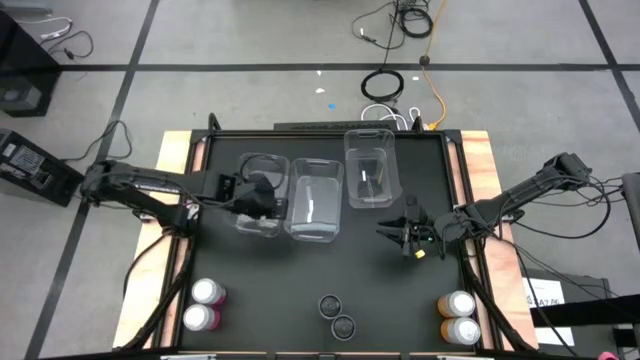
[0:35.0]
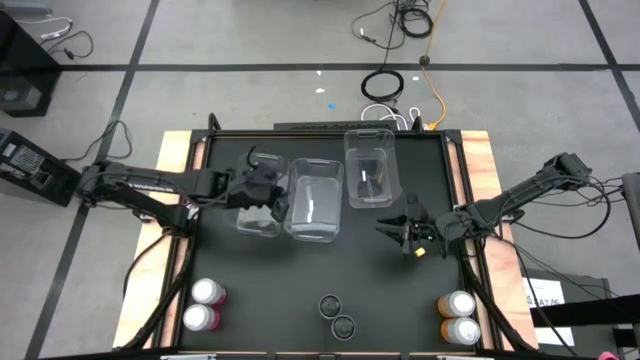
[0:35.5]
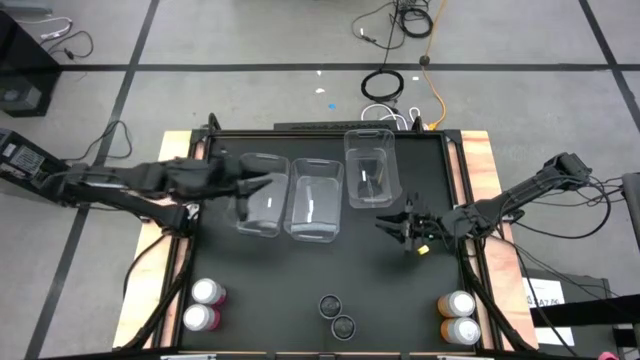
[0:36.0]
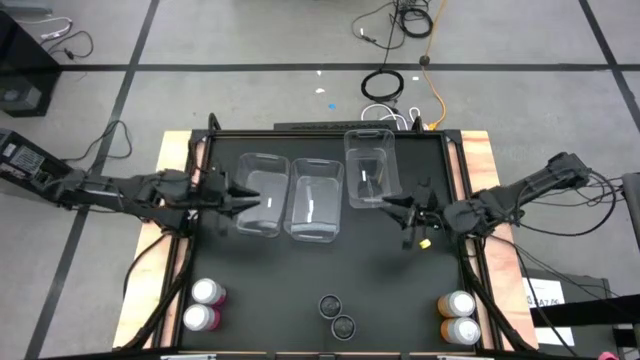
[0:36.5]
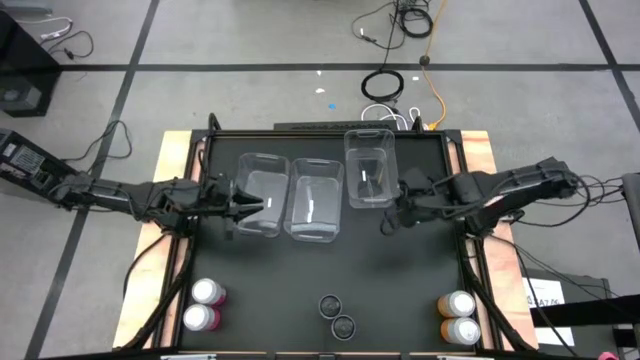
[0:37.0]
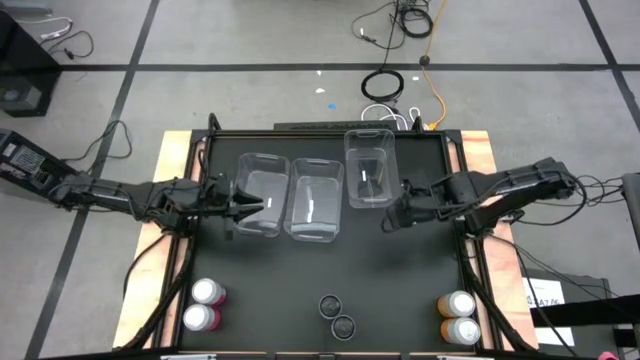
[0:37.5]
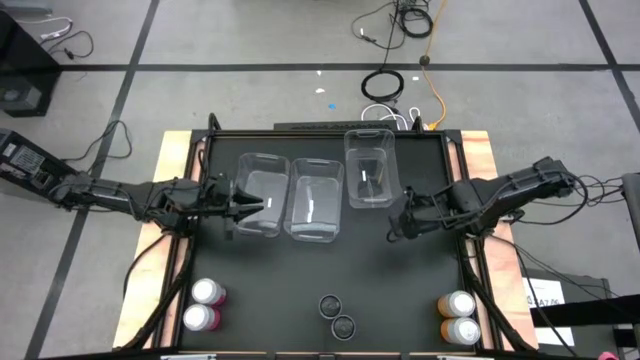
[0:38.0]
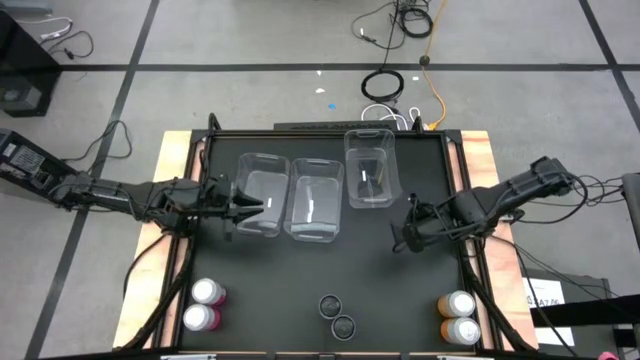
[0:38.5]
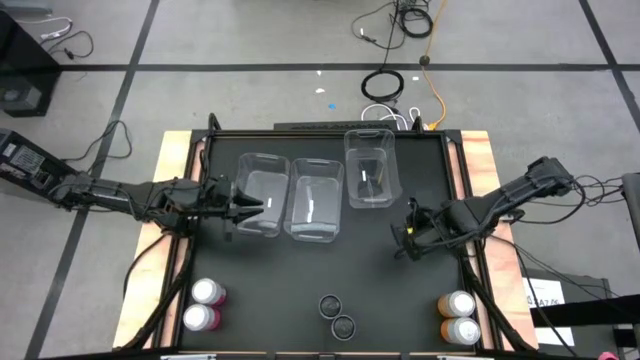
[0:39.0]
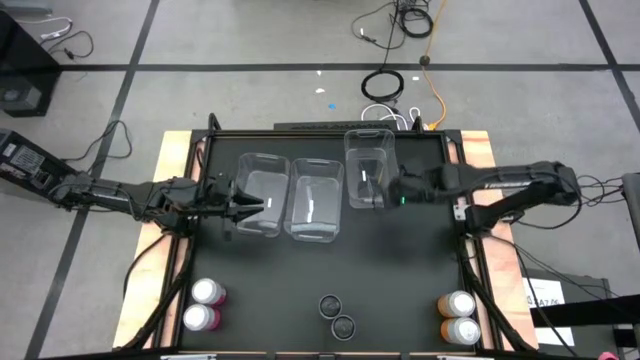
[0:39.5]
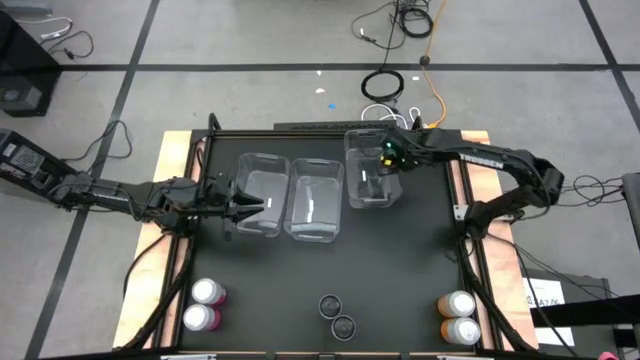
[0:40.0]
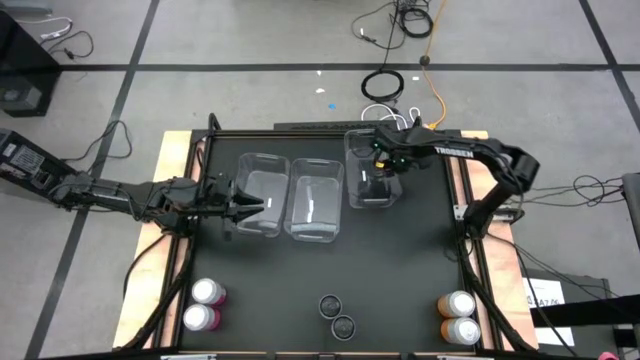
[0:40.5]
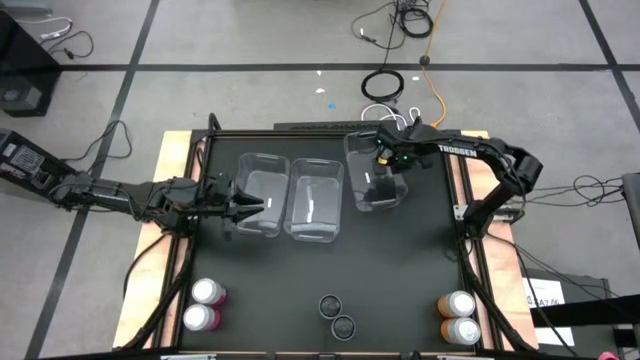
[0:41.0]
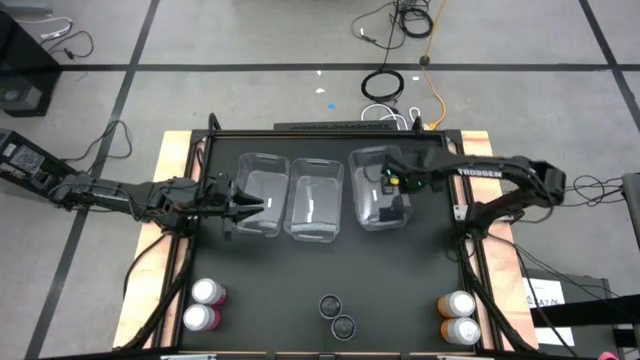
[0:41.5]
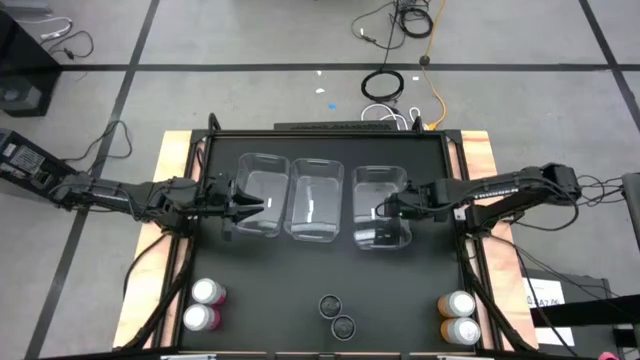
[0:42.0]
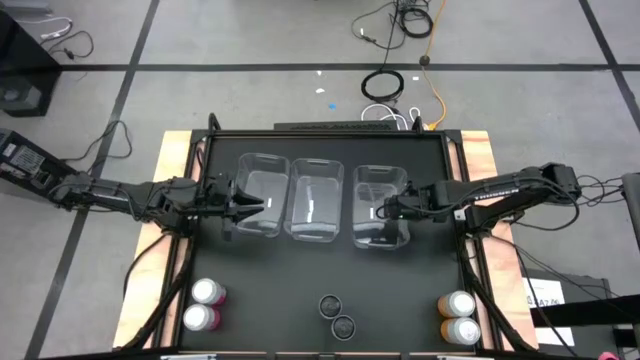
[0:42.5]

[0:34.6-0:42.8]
Task: Sort soda cans
Adjust the right transparent bin to align with the other transparent bins

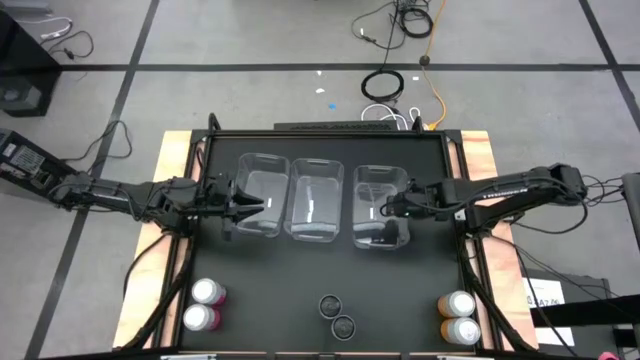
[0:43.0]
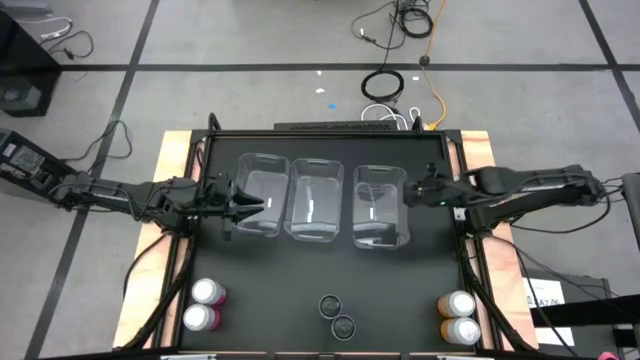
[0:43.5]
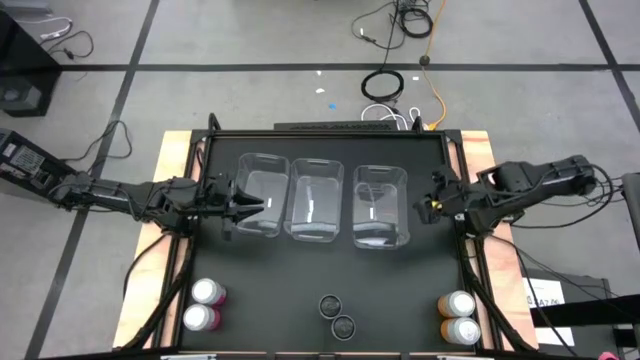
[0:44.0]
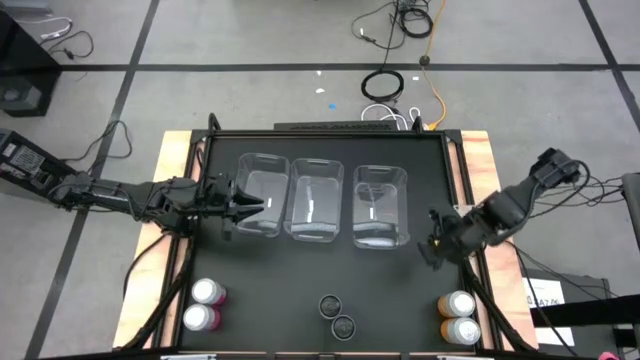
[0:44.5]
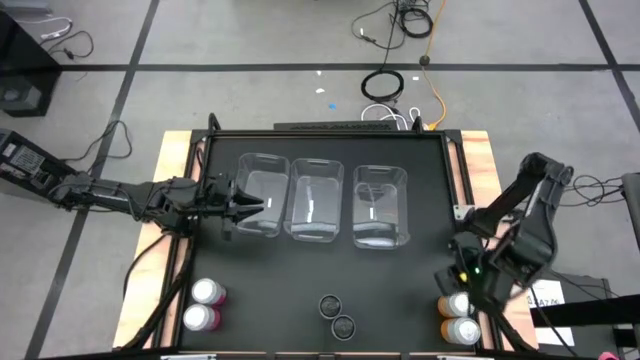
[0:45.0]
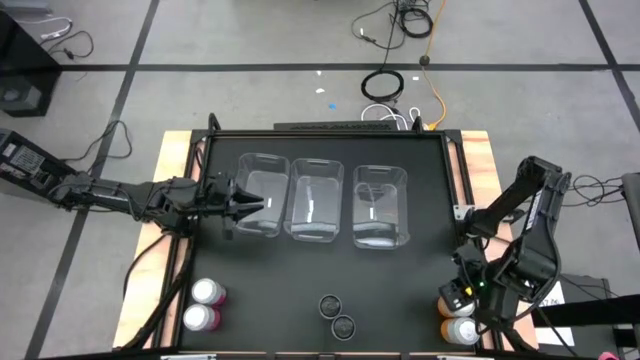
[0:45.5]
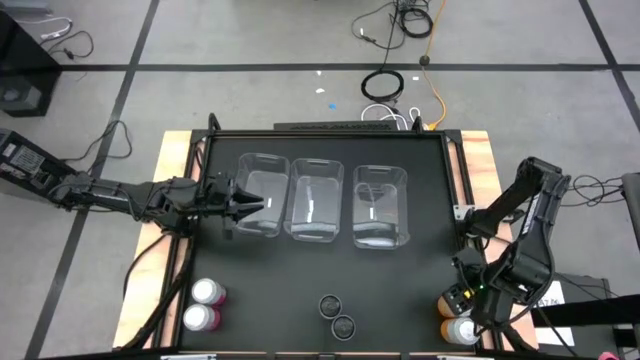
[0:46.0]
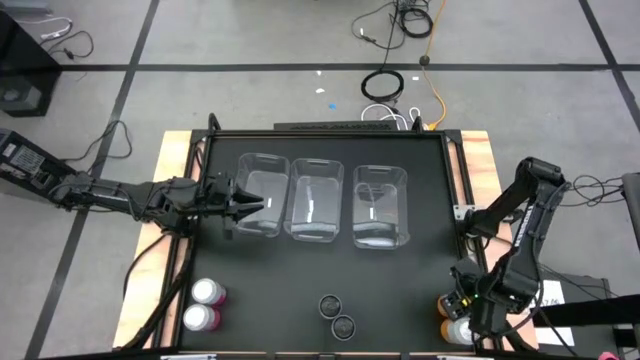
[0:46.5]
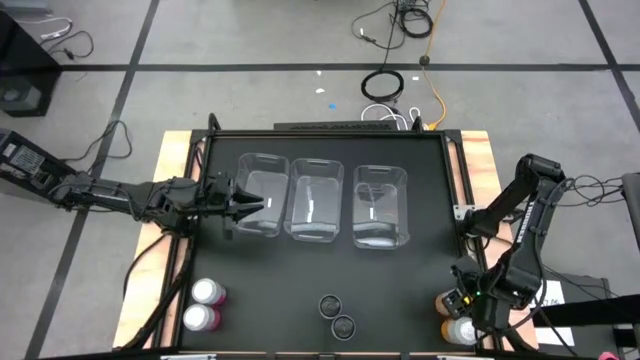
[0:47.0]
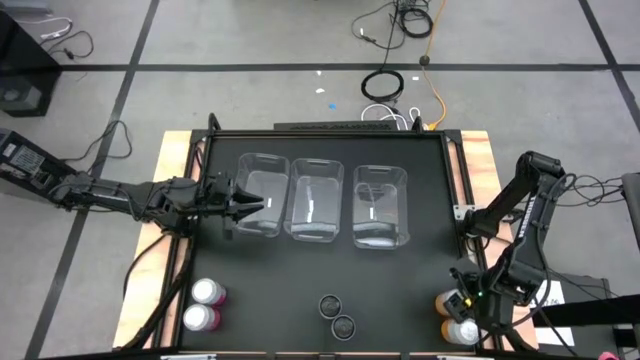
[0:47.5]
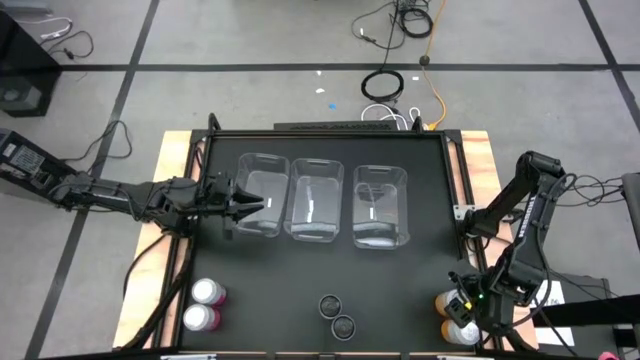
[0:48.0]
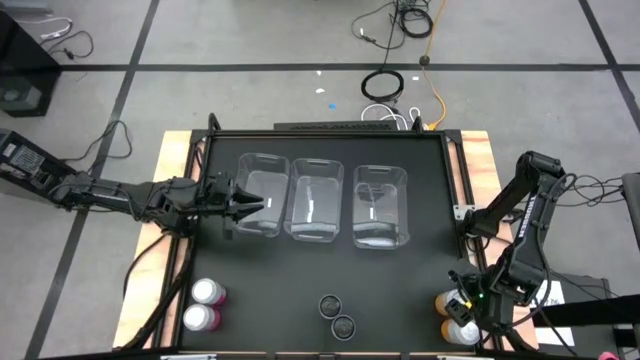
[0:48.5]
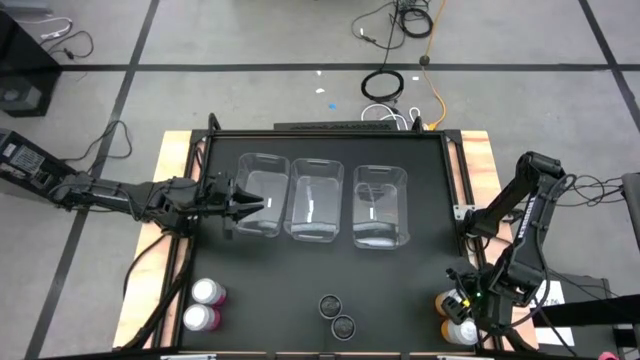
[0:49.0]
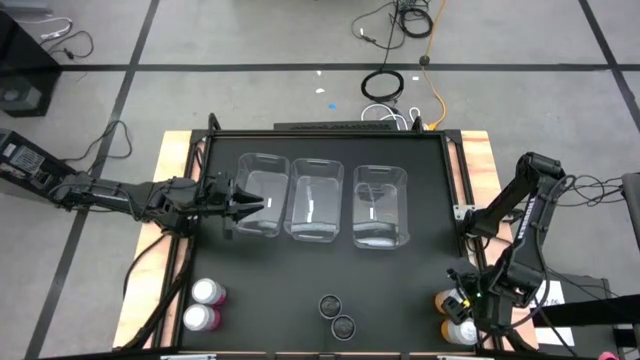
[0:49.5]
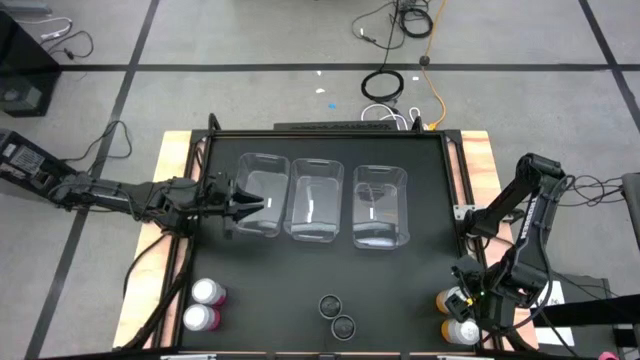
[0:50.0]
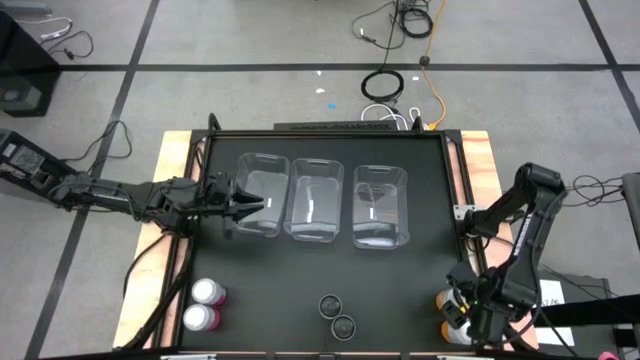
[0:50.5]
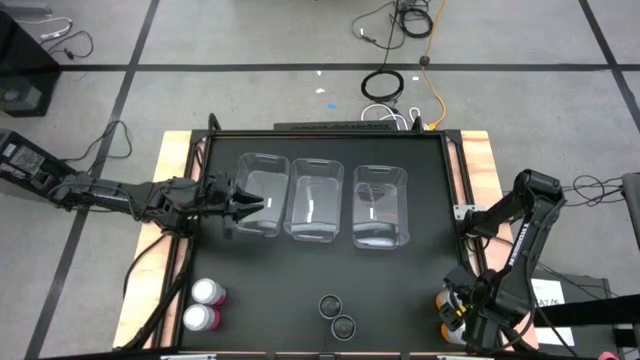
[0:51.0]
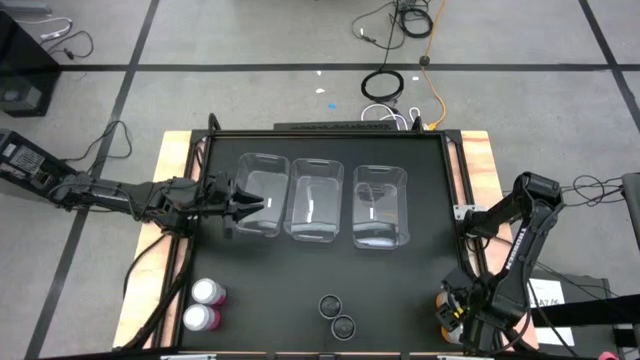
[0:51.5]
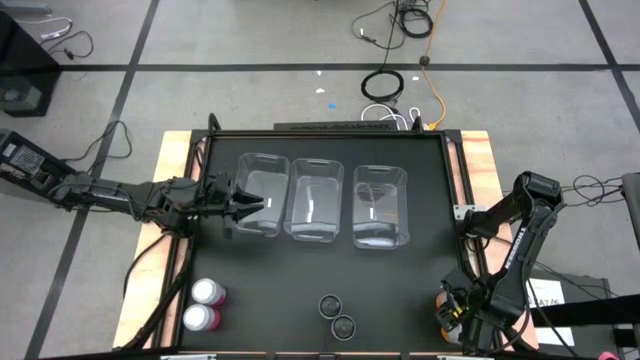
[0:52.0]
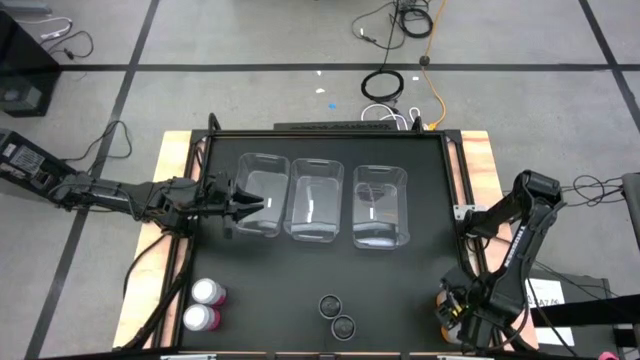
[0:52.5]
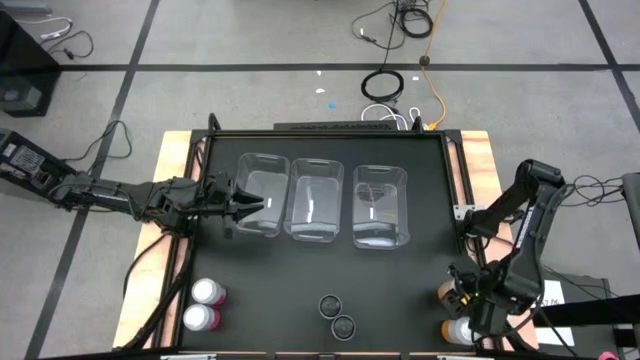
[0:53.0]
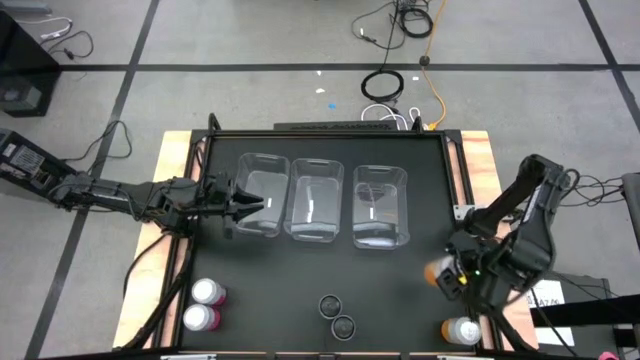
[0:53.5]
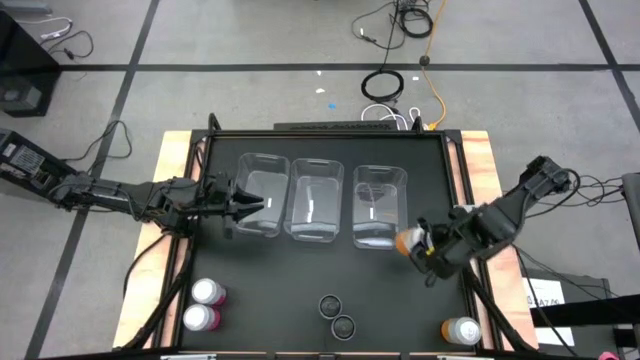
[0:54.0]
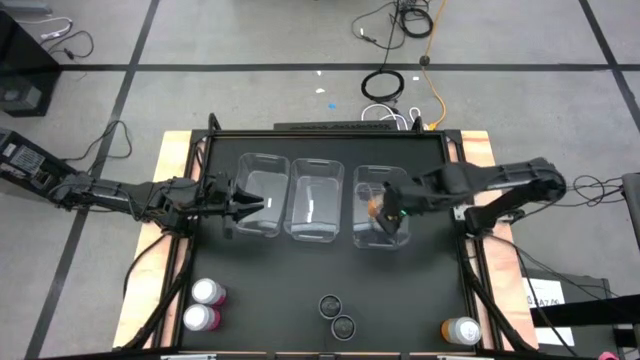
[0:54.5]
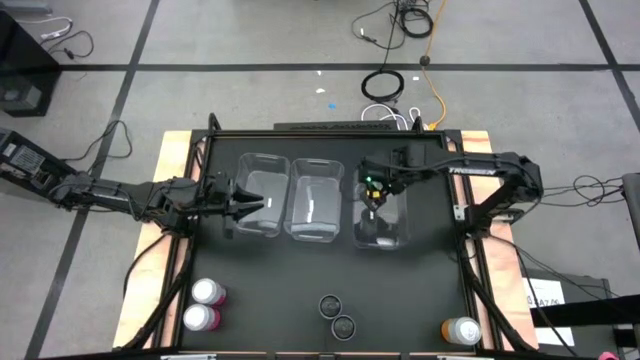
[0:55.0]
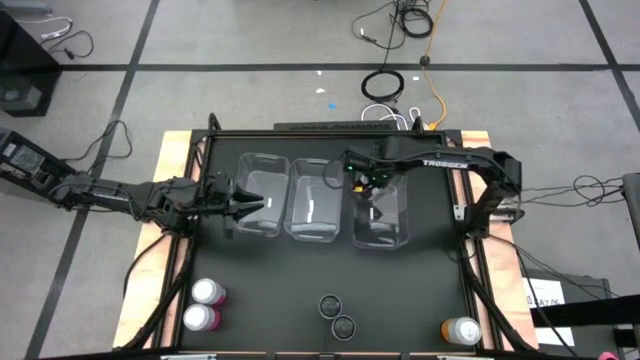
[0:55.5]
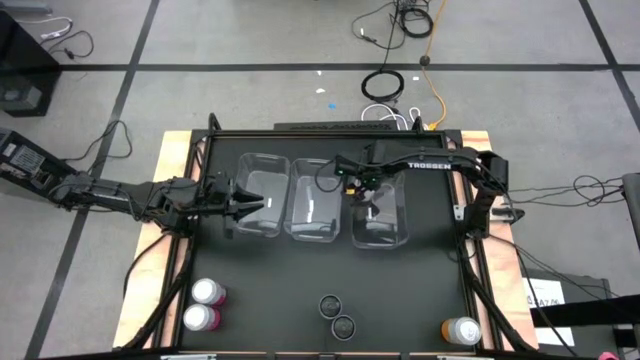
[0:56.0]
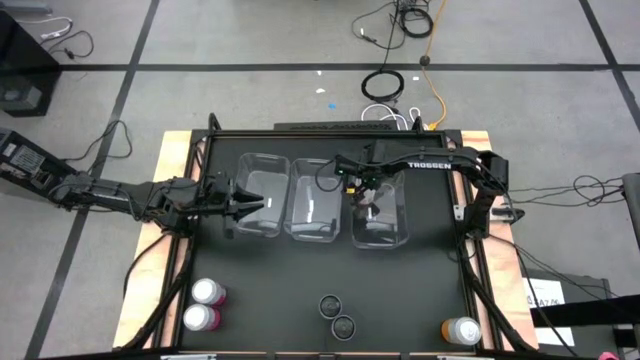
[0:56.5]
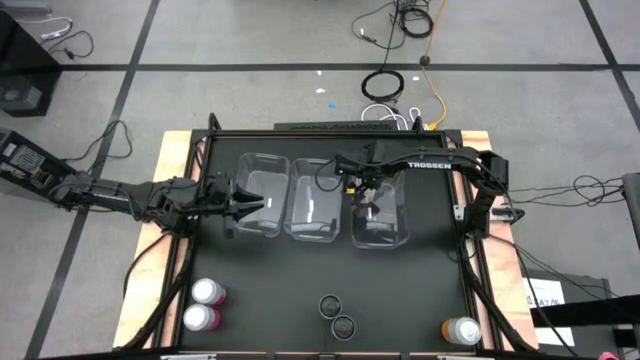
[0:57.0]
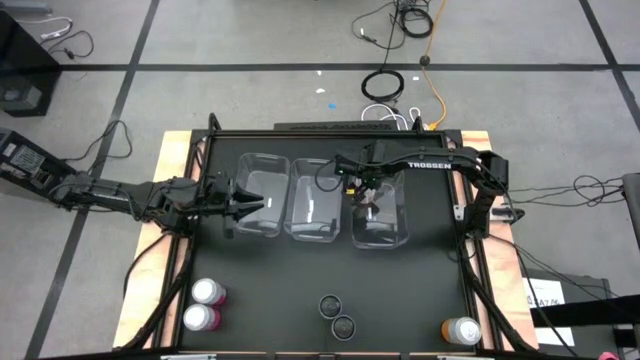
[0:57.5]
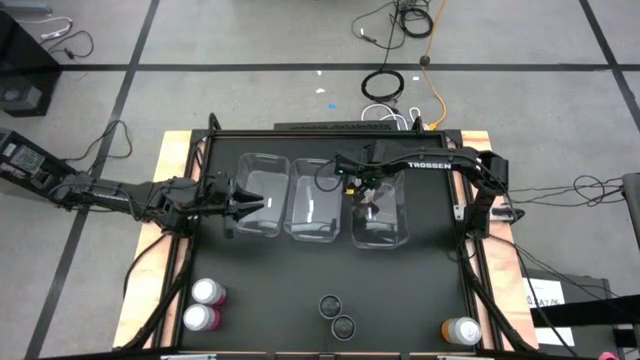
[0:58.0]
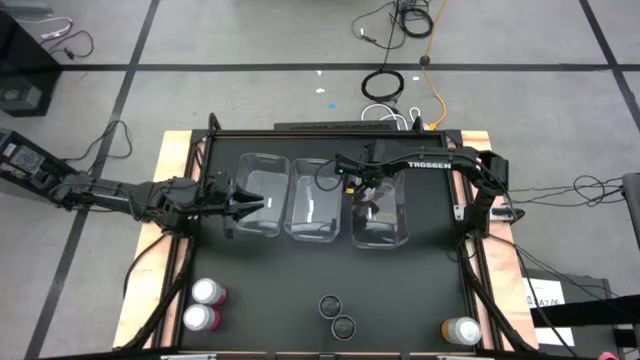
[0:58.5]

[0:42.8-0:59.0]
Put the top yellow-white soda can into the right transparent bin
